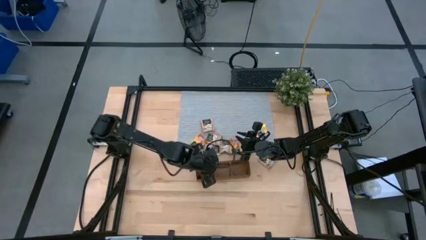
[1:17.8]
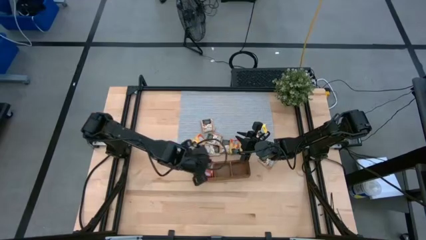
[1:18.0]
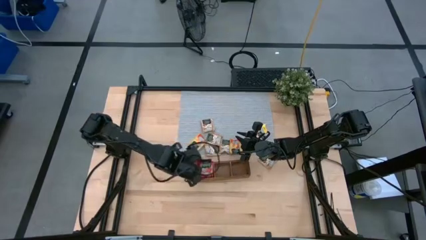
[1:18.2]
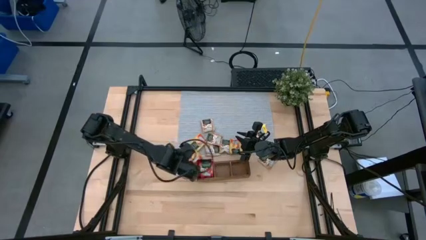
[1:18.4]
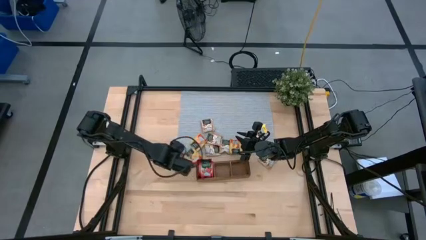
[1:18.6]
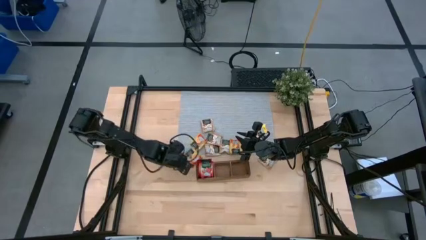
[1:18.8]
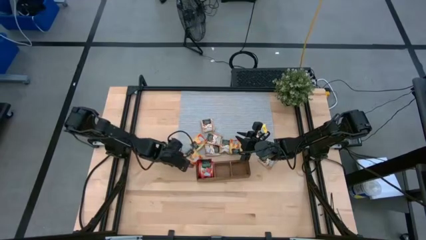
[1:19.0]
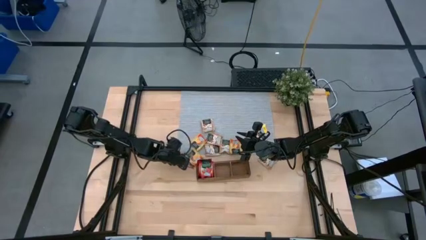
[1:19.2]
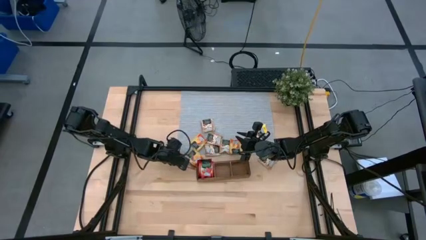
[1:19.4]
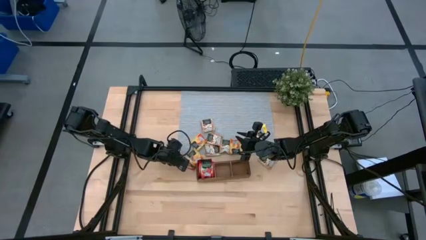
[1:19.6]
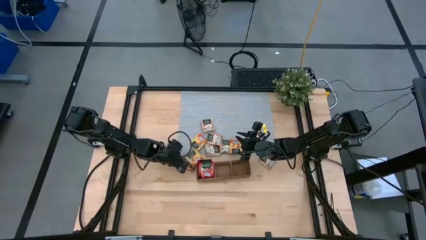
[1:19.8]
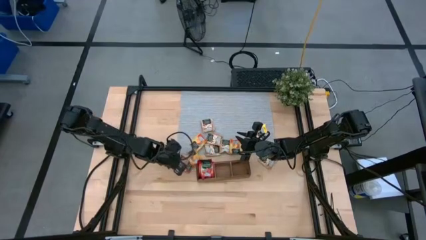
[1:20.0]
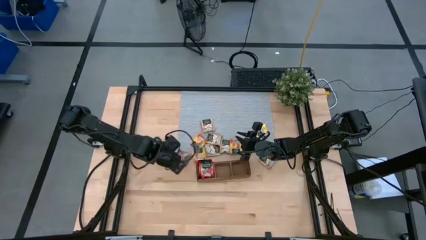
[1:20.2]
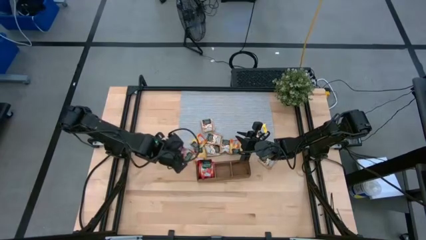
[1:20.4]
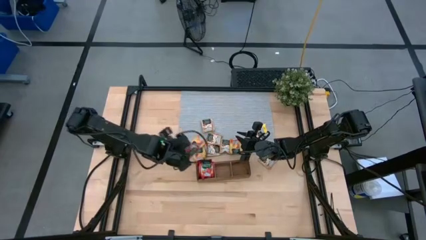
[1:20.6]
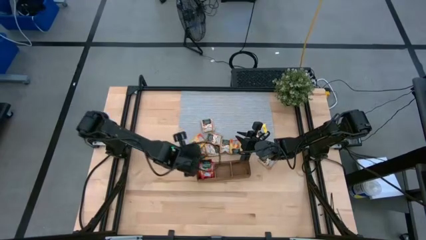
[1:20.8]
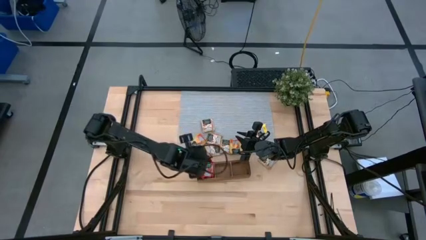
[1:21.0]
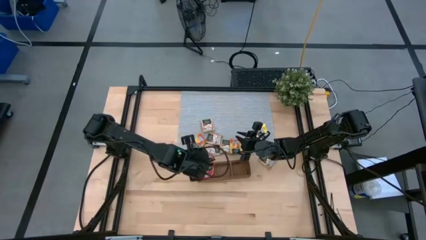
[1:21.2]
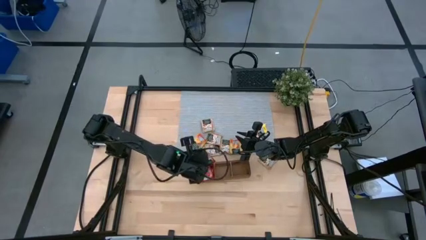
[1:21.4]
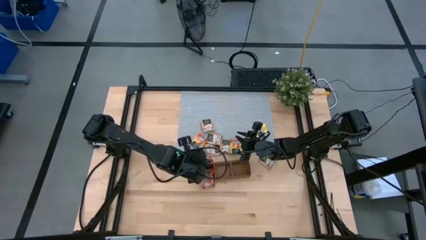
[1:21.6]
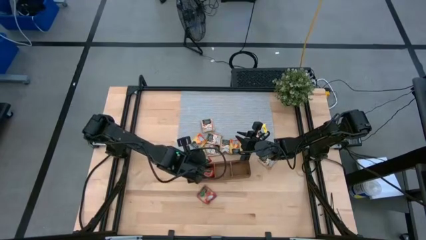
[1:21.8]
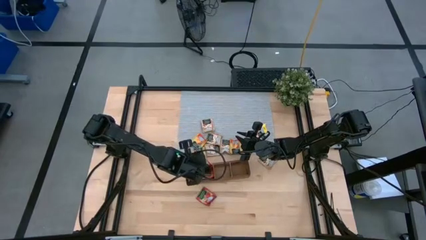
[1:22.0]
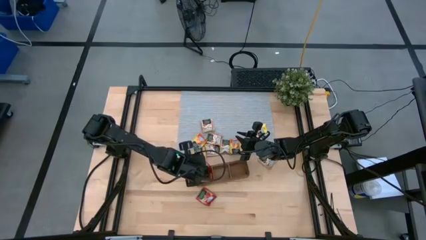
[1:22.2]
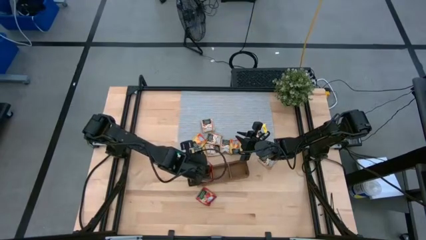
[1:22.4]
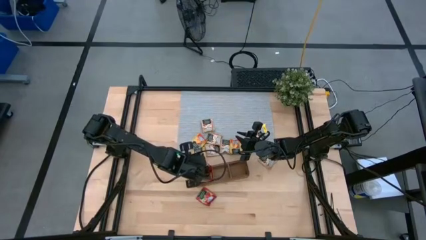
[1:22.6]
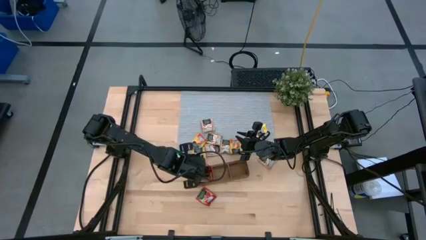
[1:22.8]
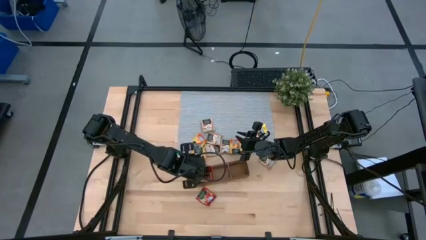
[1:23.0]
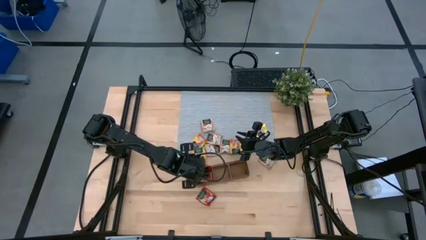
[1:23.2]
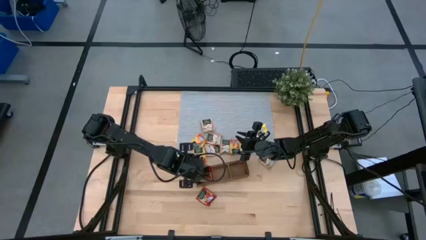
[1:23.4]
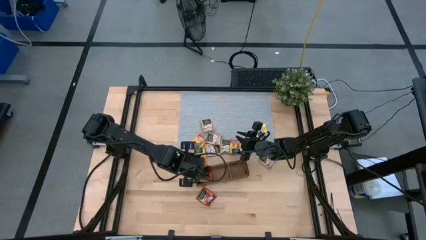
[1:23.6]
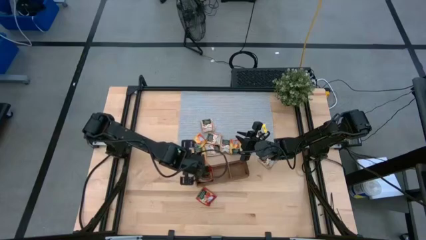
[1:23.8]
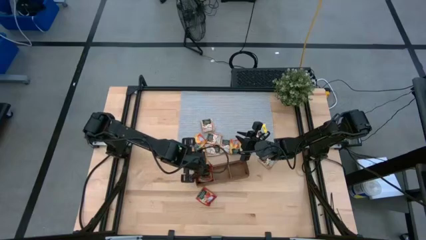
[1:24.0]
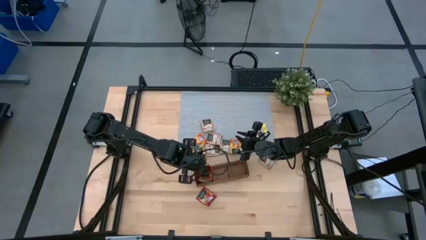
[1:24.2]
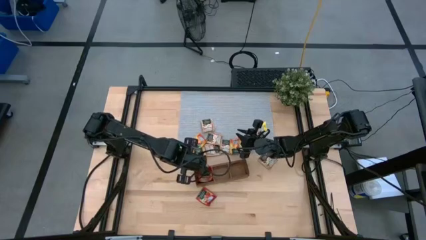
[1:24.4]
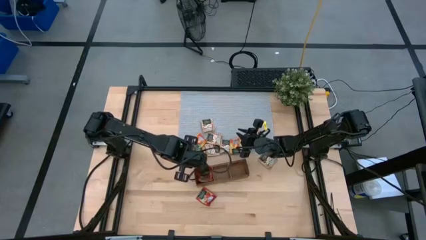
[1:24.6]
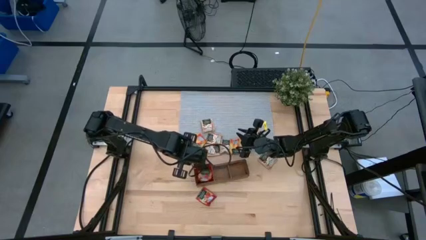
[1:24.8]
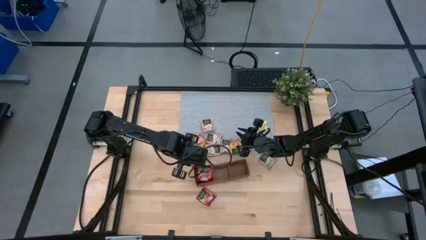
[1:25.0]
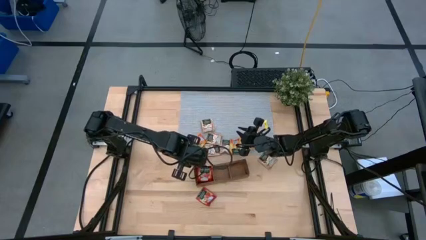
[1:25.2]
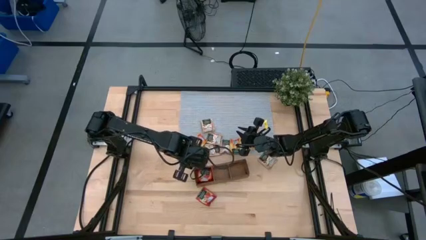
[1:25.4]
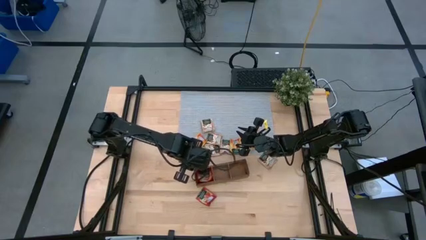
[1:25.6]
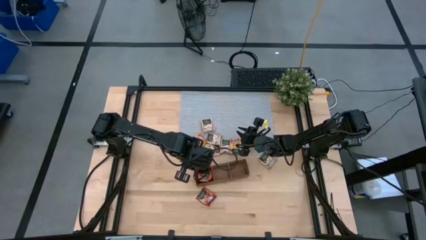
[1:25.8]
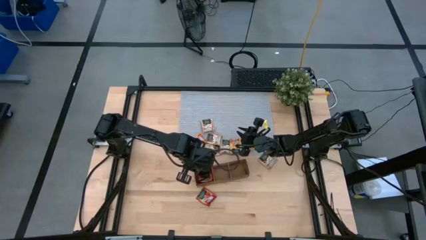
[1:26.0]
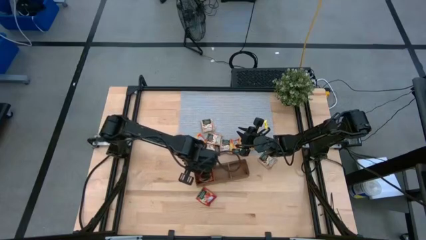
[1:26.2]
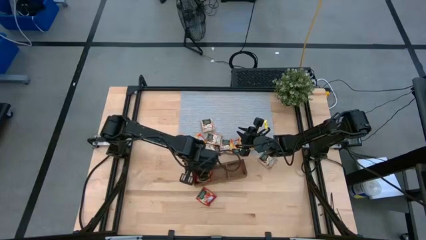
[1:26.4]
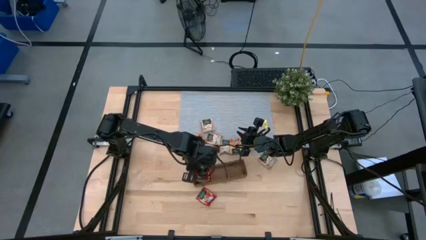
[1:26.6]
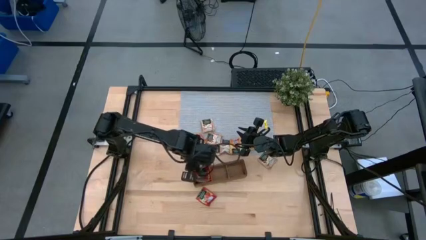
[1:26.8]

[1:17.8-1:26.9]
Task: Pick & Place Tea
Put the red tea bag into the left section of the wooden organizer

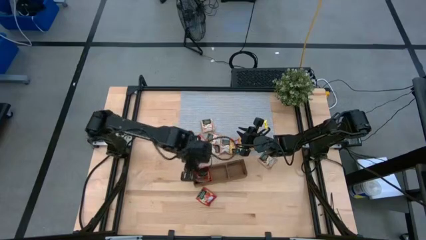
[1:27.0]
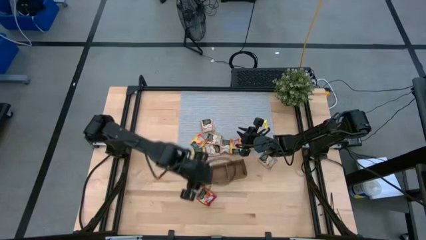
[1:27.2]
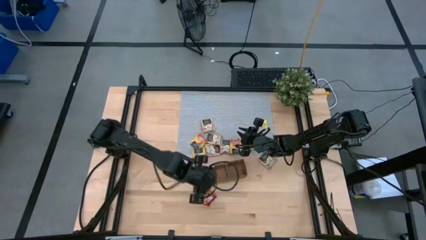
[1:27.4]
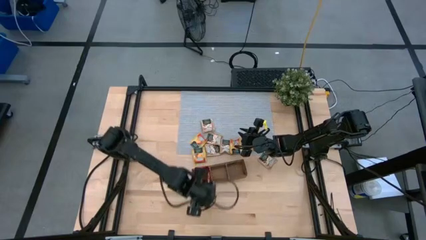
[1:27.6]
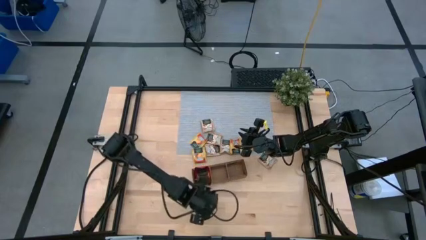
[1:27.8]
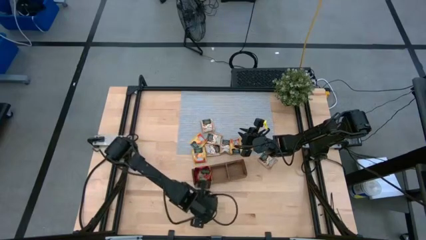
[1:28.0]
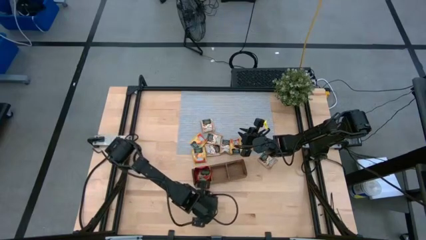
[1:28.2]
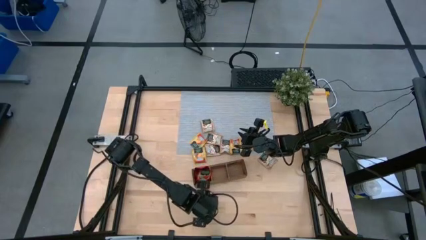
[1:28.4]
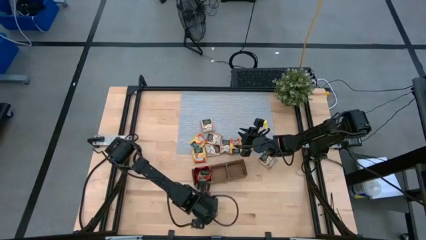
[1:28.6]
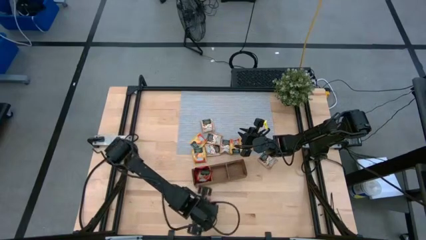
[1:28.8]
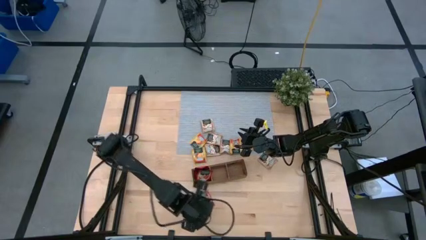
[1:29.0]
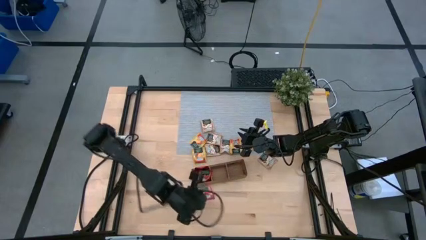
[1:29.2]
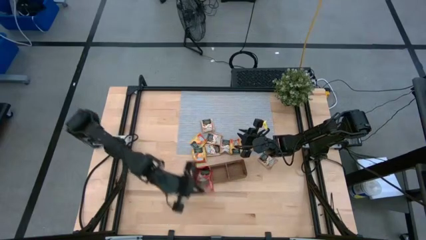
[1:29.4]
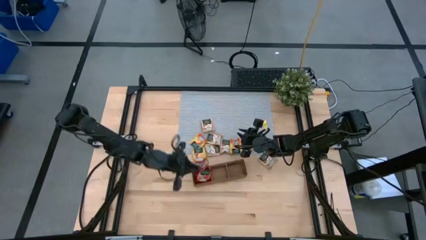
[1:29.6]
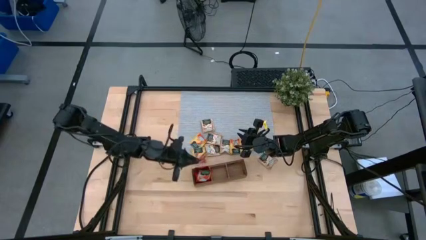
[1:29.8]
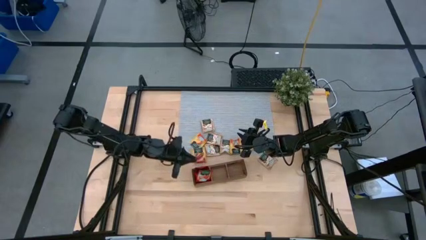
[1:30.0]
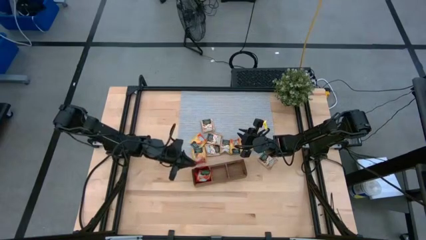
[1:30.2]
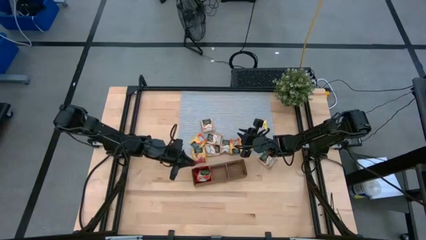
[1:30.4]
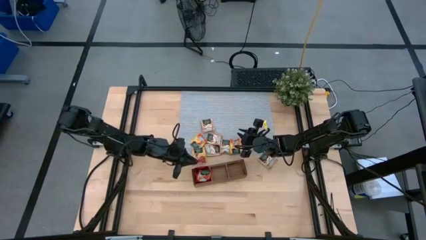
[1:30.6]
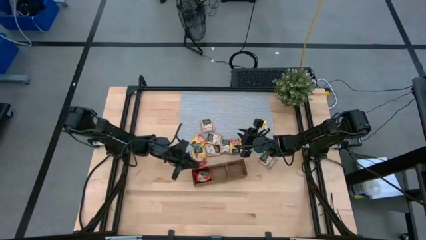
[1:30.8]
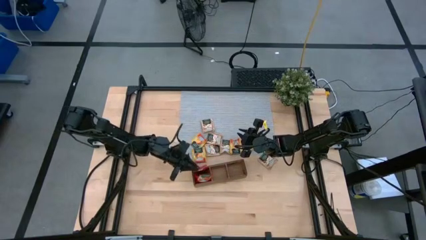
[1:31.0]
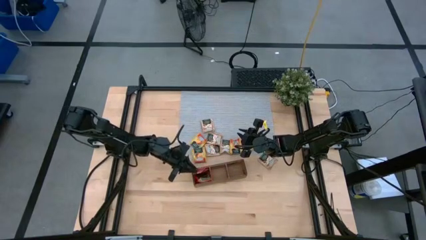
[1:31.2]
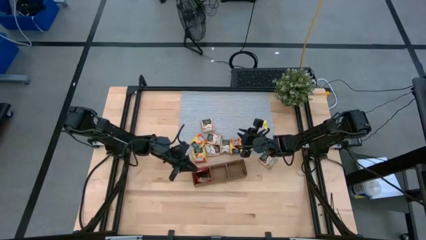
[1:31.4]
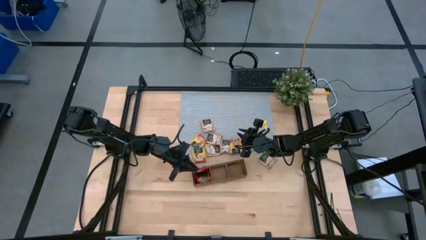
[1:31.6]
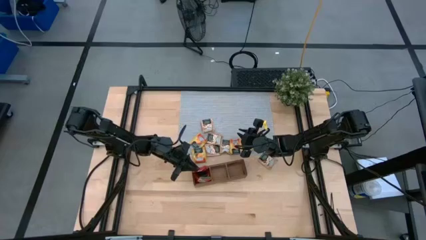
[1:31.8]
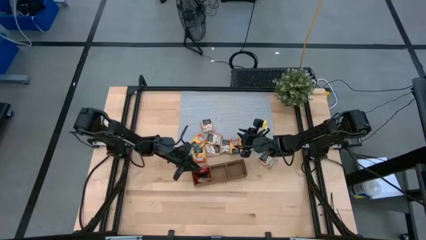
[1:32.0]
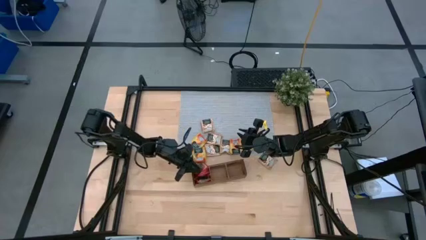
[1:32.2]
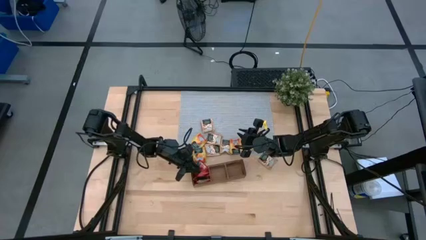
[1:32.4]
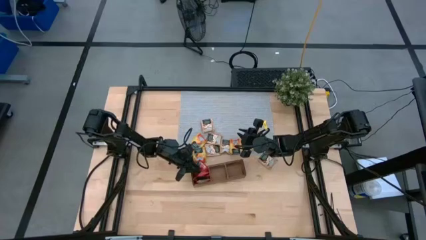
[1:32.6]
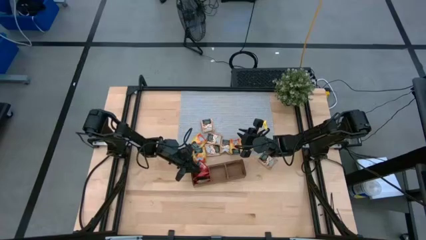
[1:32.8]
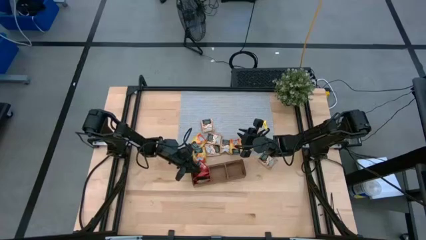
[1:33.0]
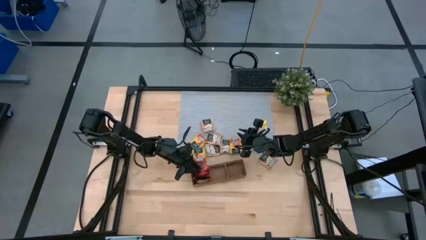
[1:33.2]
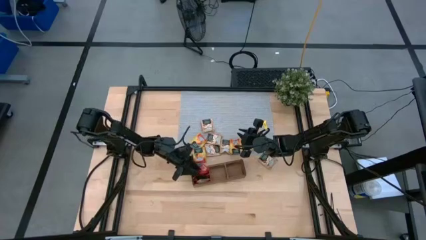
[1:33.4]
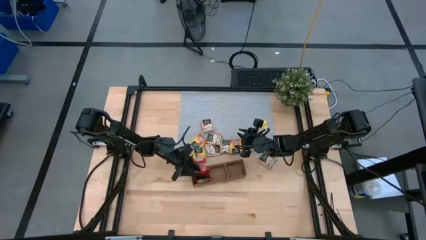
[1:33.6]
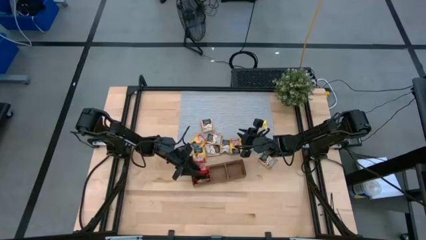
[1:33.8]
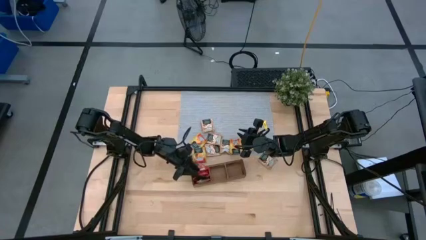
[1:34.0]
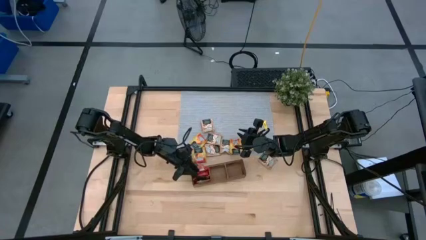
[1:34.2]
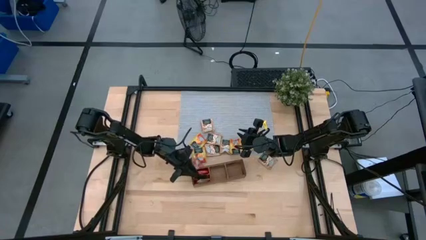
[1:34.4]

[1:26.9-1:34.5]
Put the red tea bag into the left section of the wooden organizer
